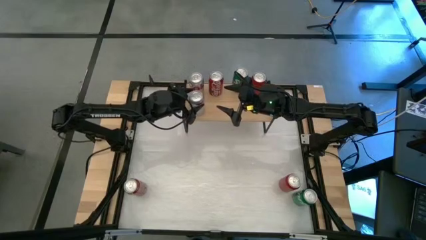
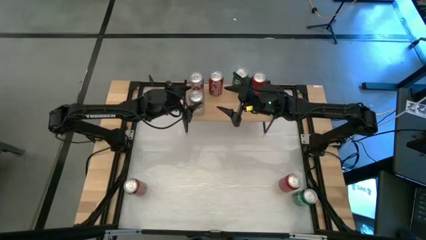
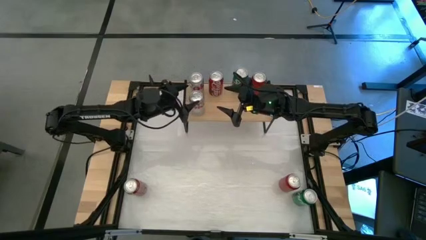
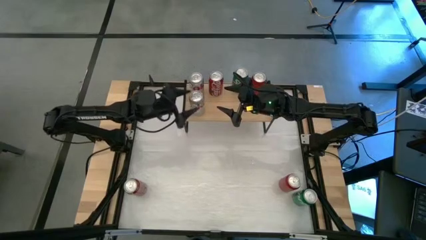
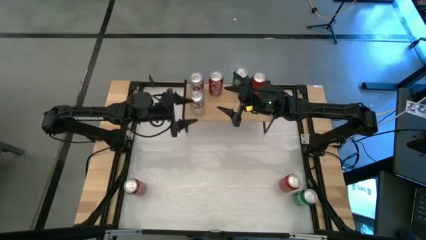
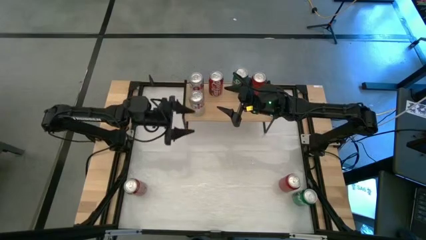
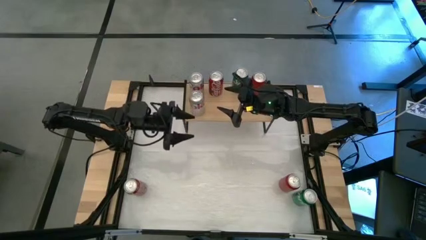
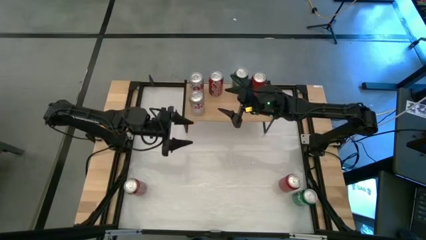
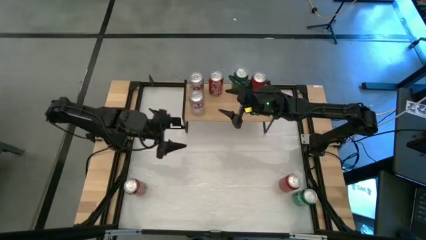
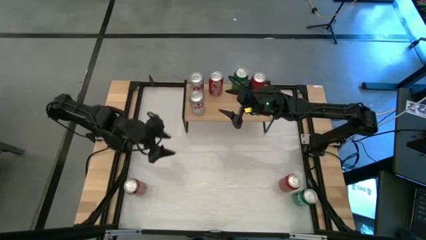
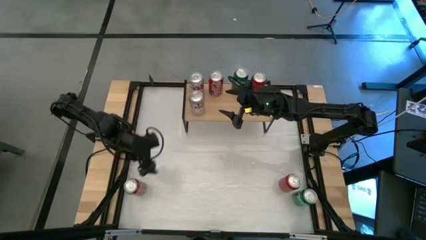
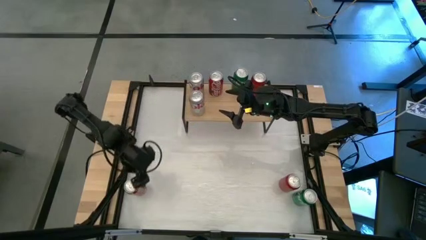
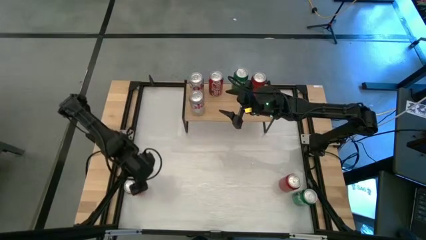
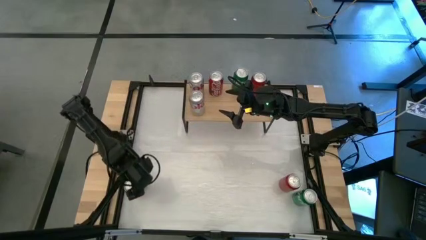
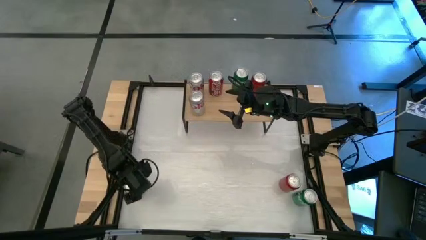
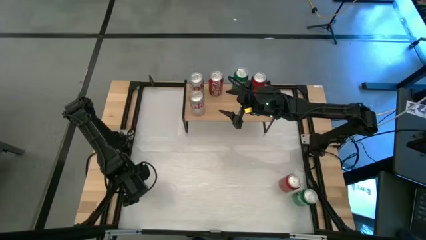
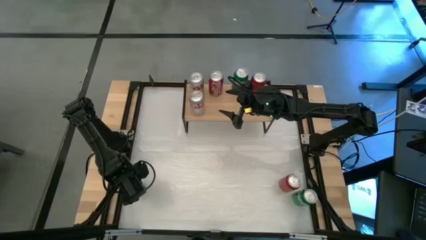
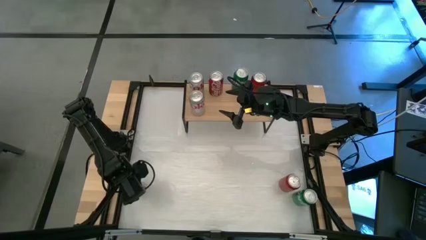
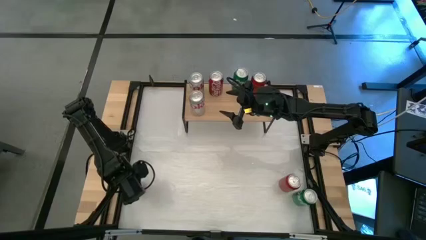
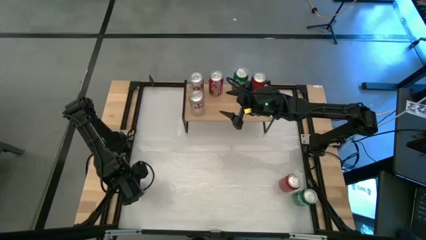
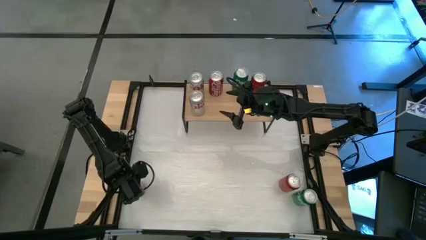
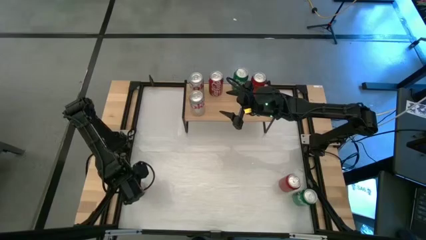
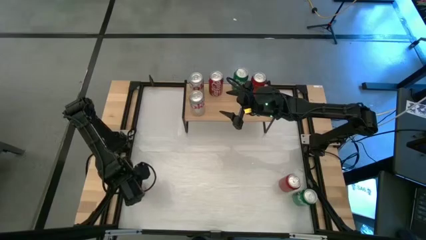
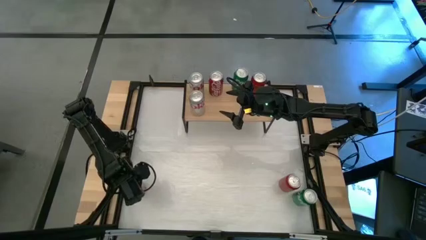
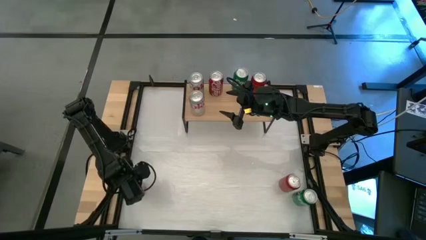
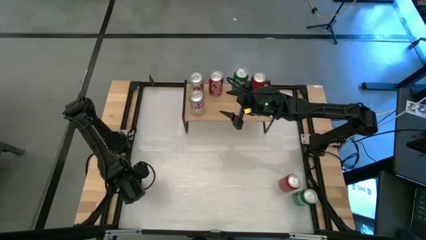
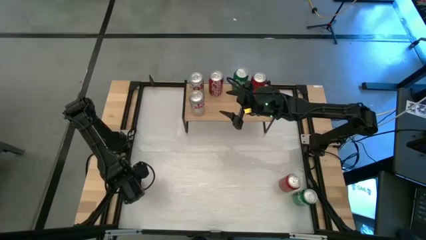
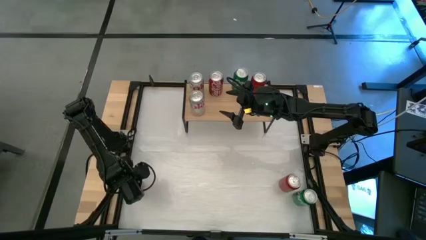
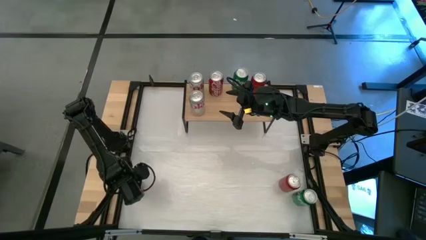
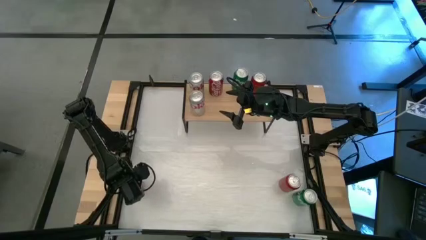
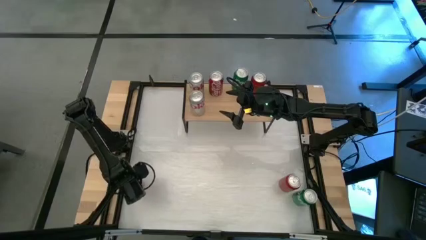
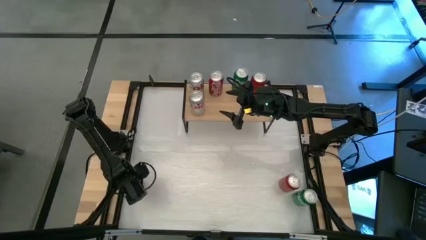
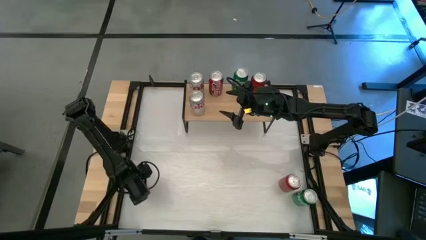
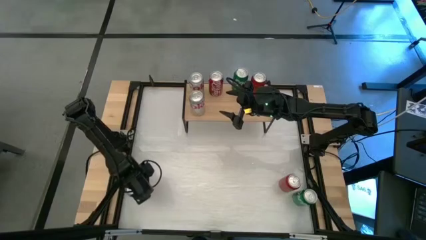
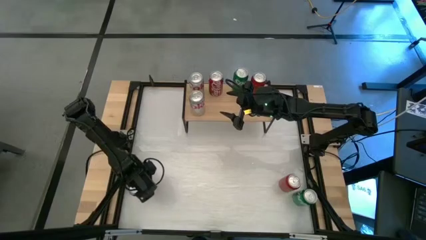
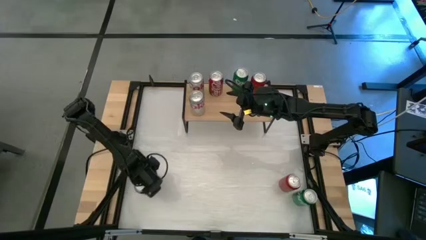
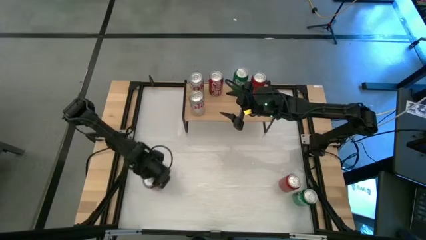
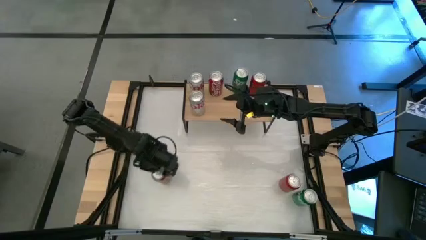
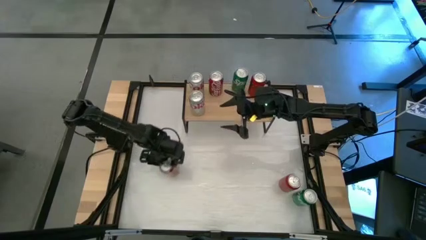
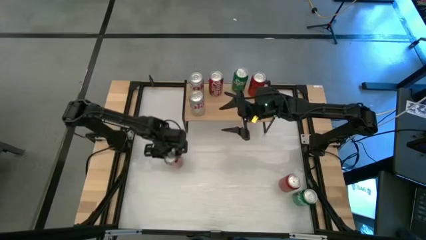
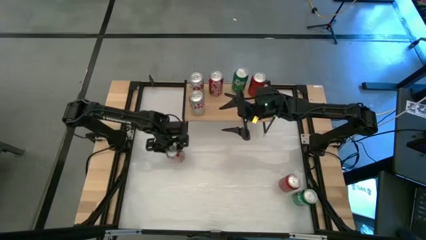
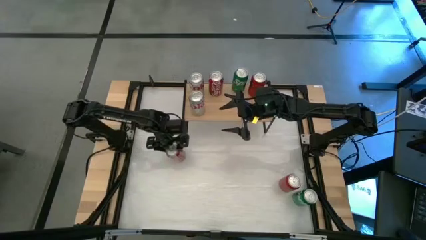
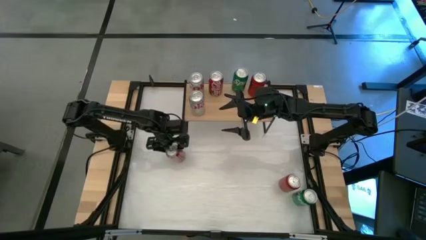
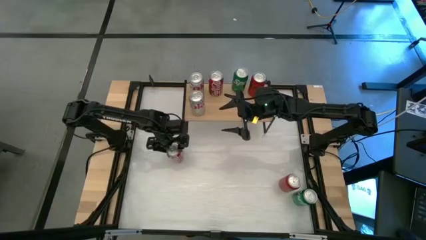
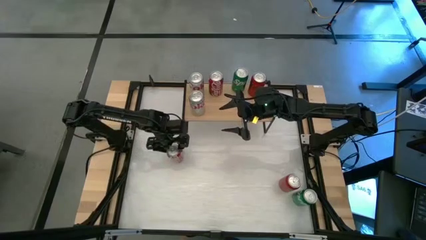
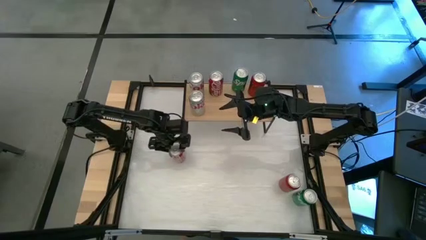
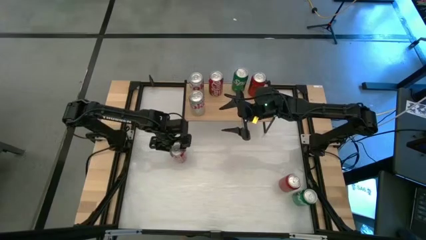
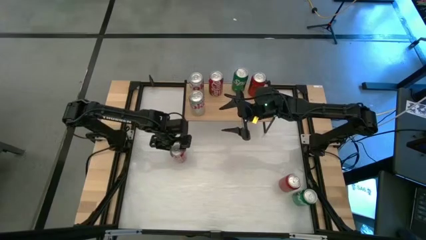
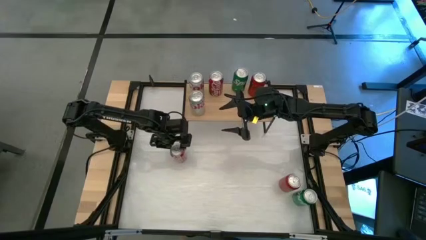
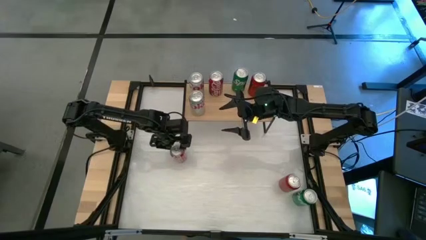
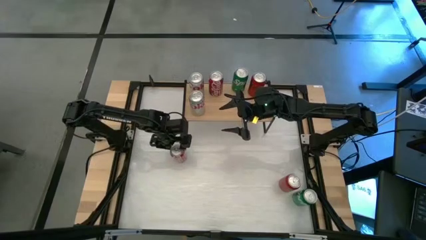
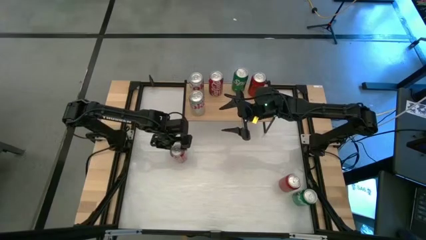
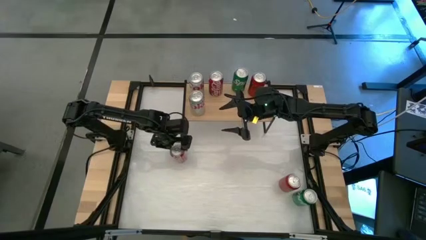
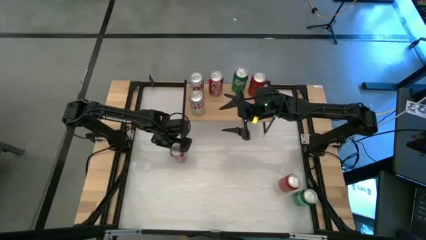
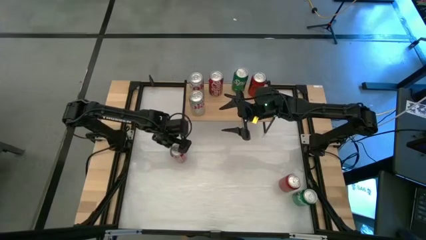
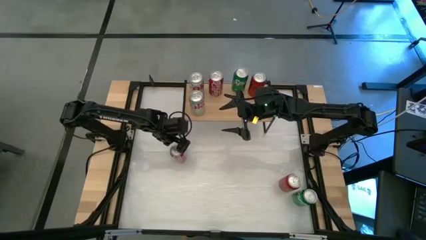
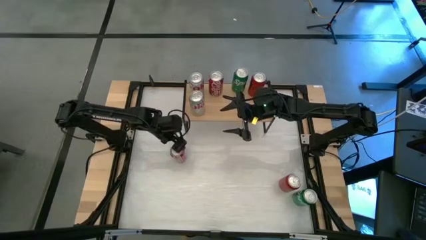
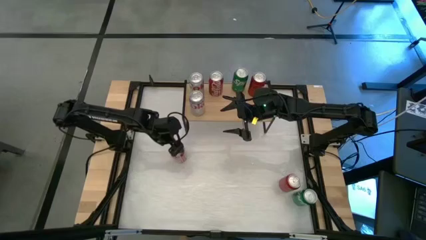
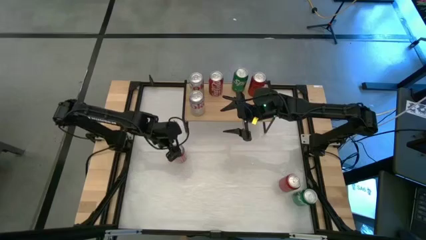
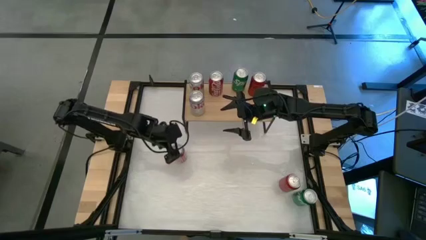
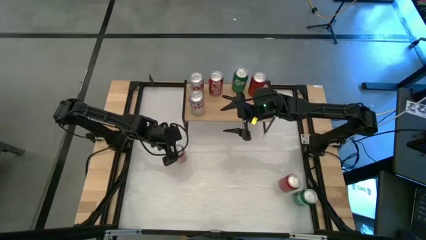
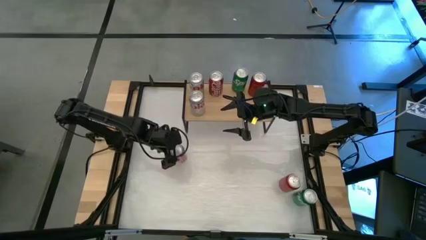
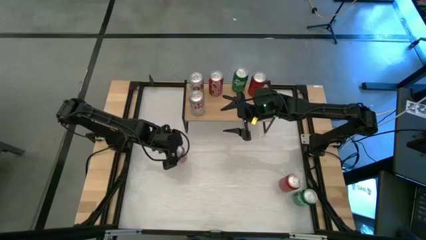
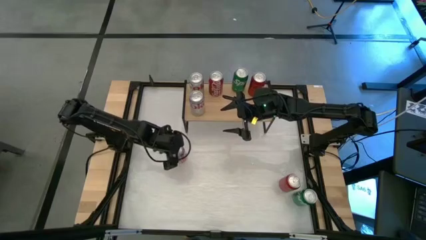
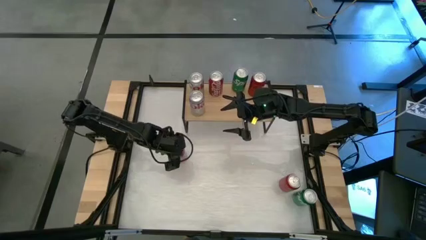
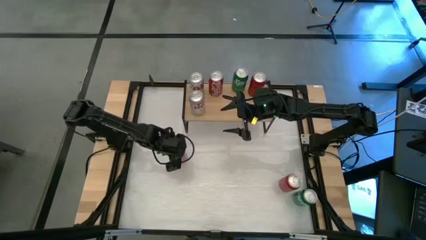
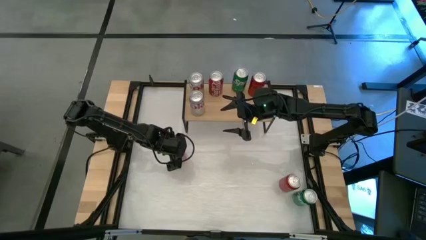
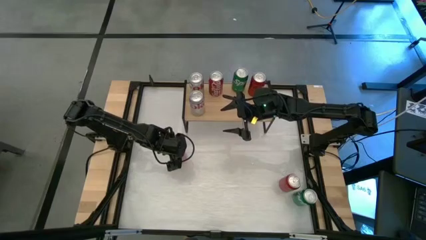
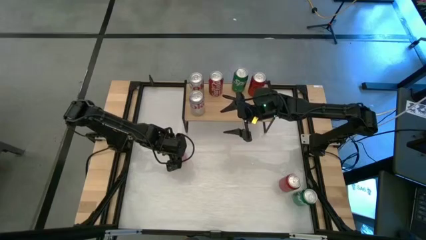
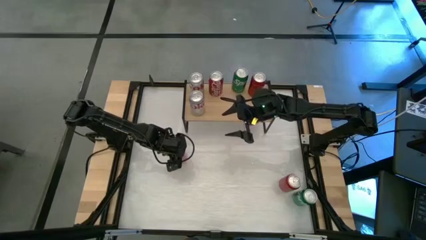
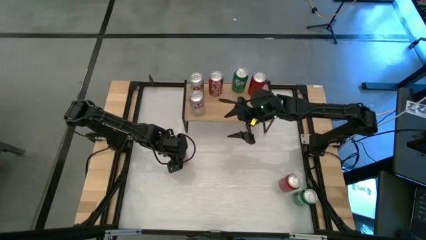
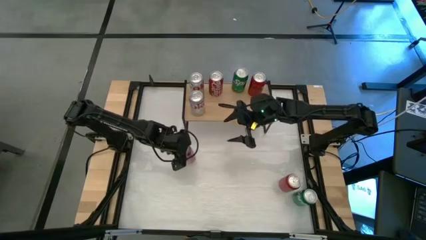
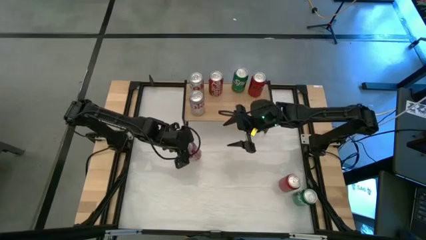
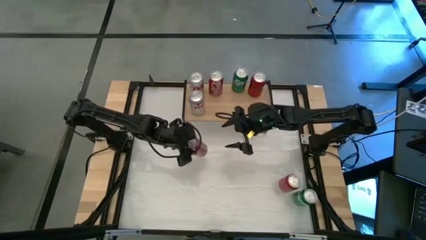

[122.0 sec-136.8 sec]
Task: Place canned beverage on shelf
Put the red-white soda can aligned with the other red soda can on the shelf

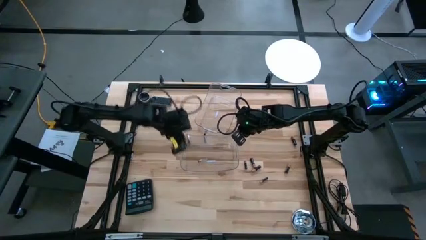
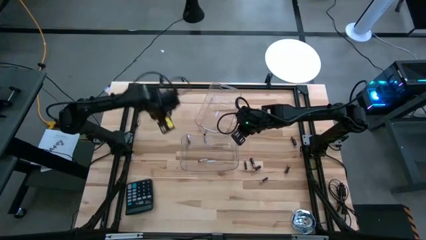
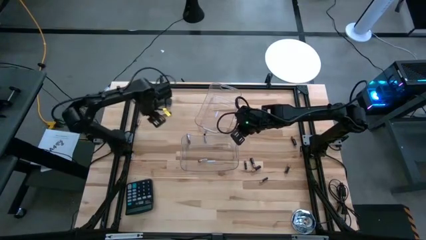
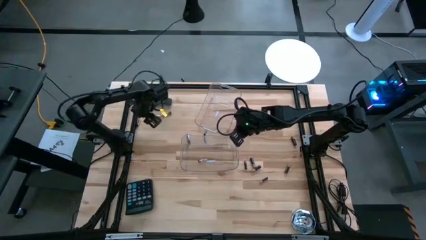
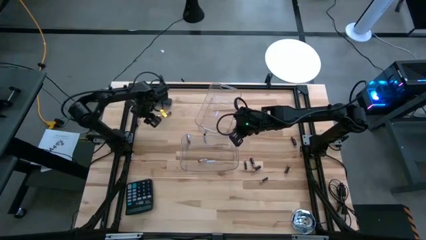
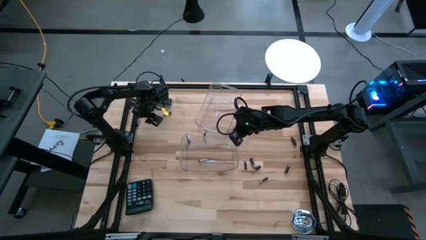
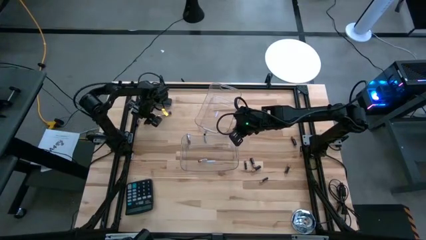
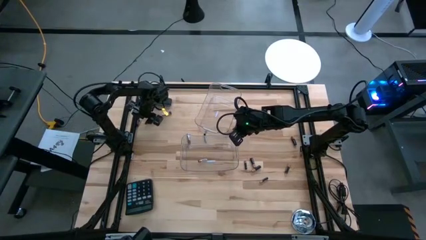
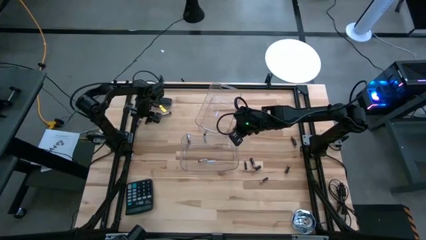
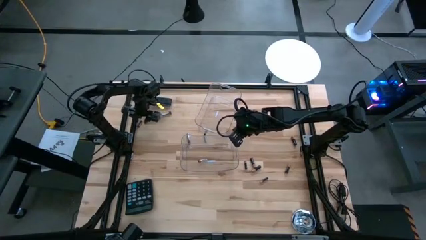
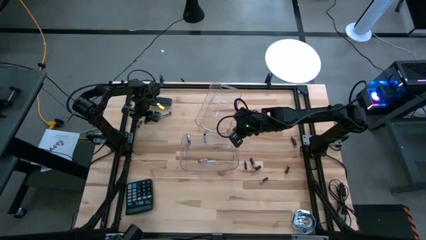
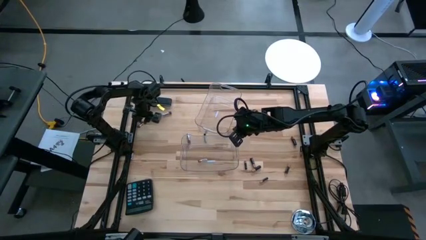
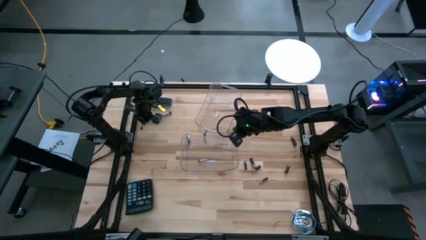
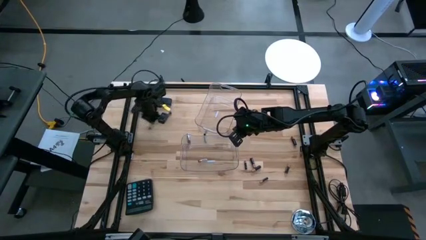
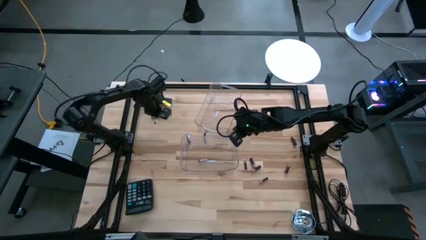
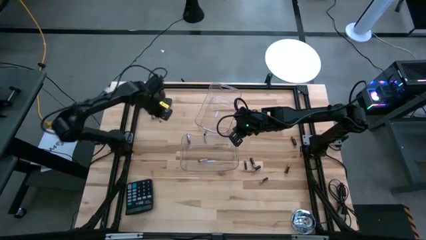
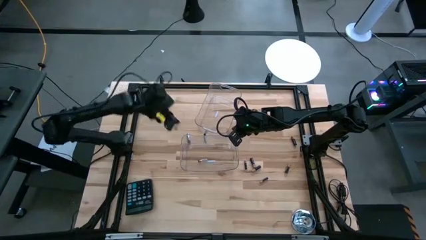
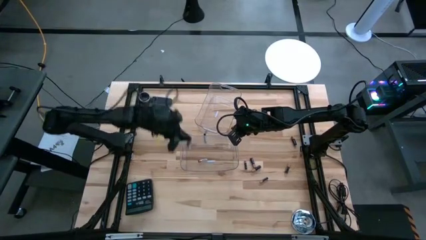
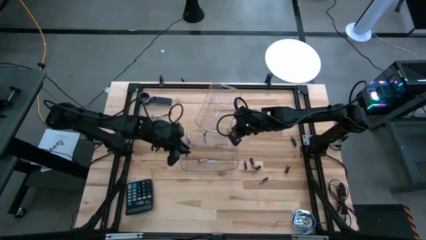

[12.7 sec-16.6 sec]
Task: Sort batteries
Put the silver battery into the bottom transparent bin
